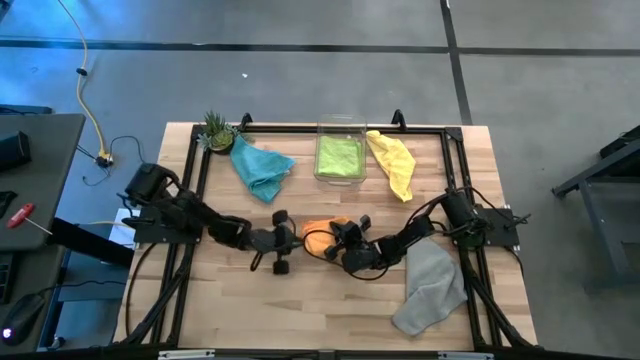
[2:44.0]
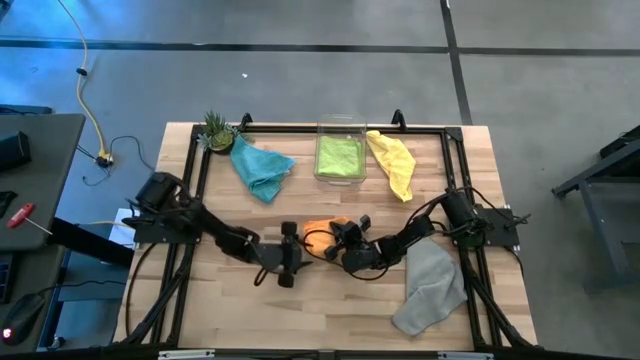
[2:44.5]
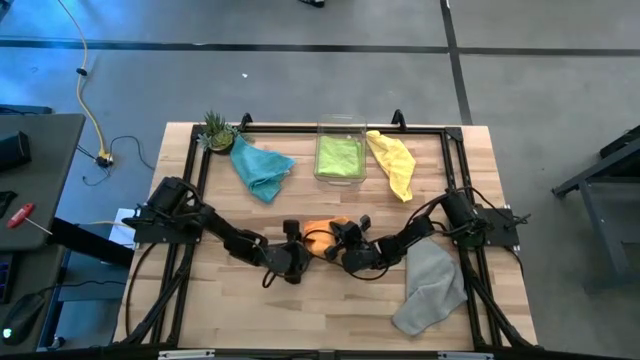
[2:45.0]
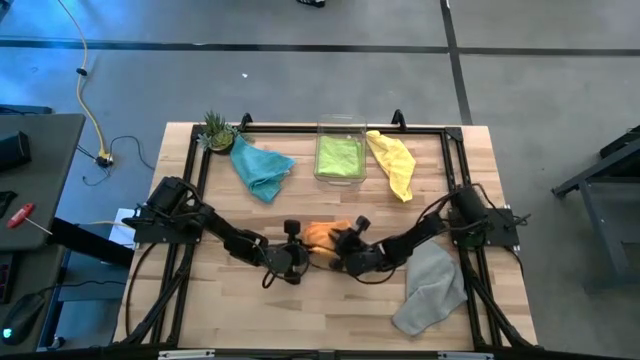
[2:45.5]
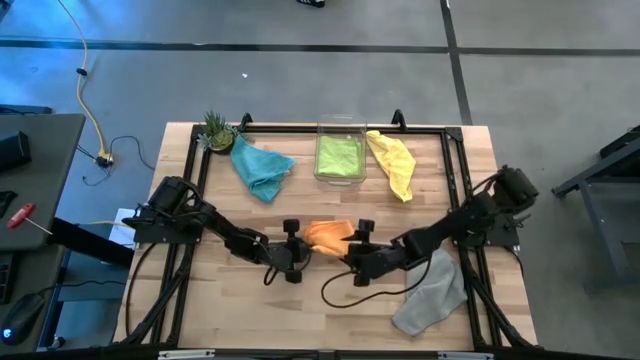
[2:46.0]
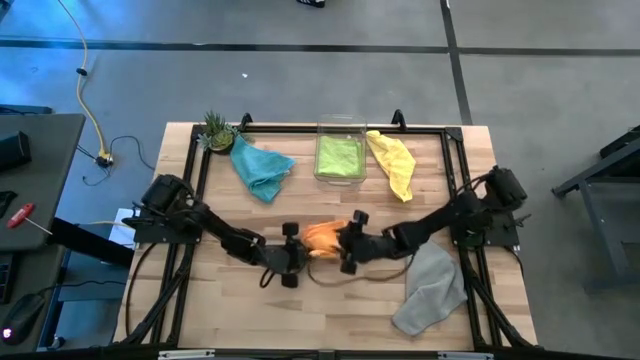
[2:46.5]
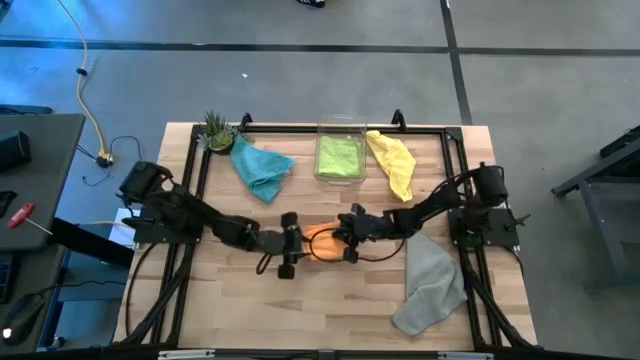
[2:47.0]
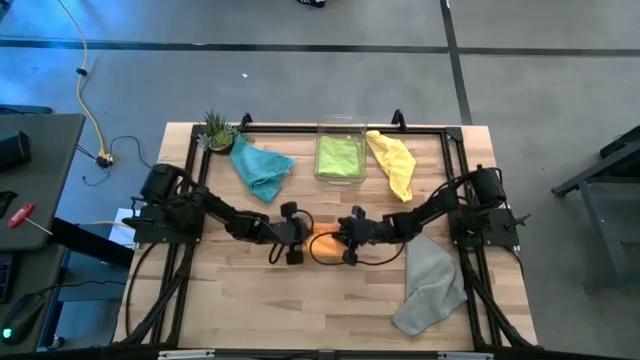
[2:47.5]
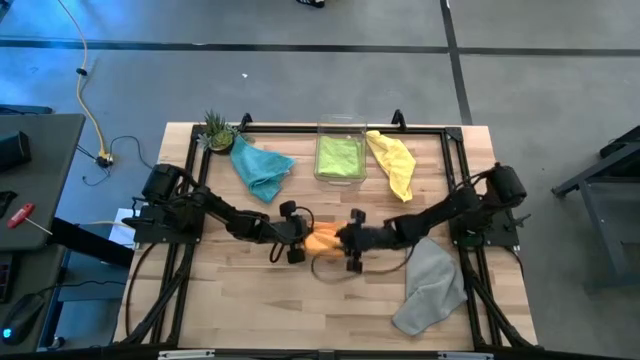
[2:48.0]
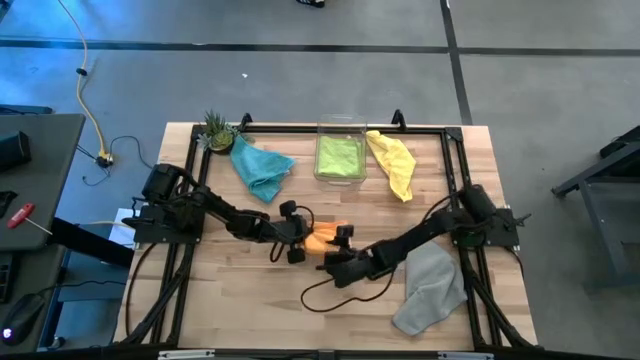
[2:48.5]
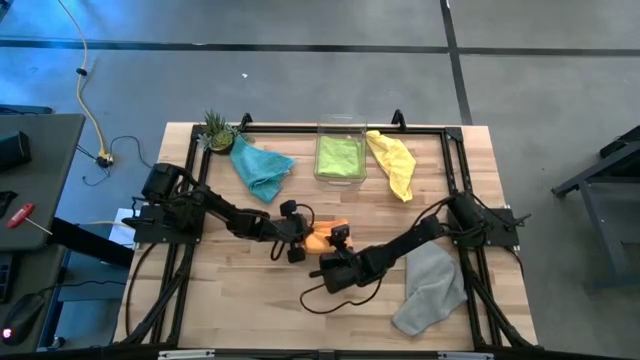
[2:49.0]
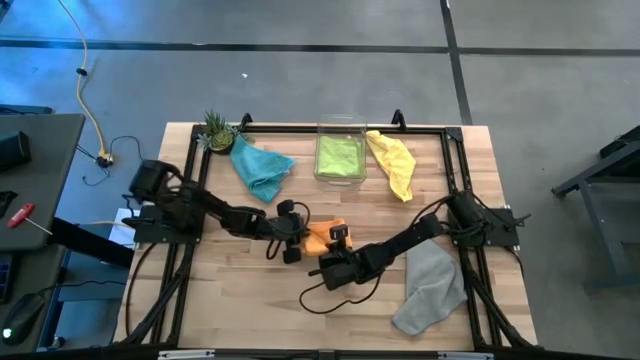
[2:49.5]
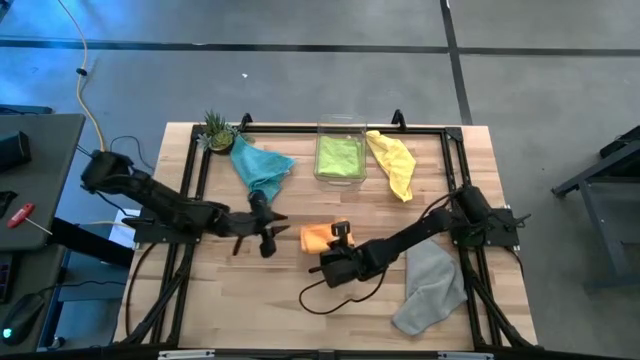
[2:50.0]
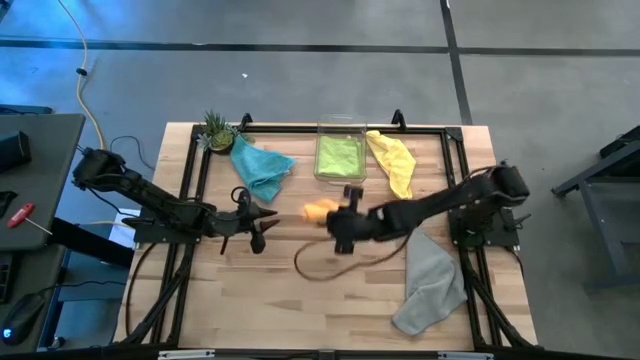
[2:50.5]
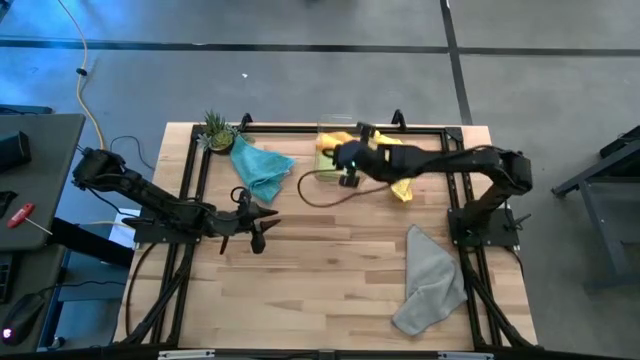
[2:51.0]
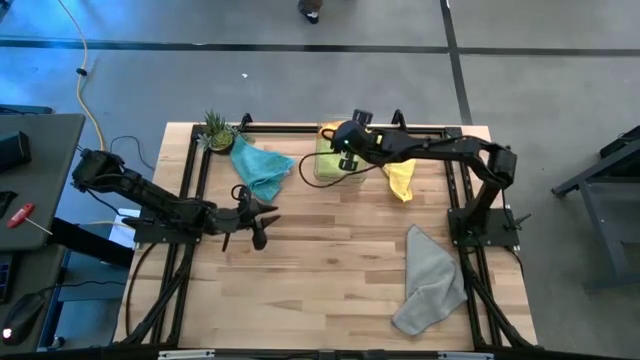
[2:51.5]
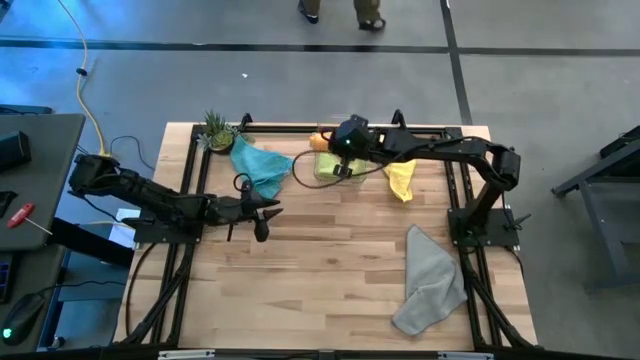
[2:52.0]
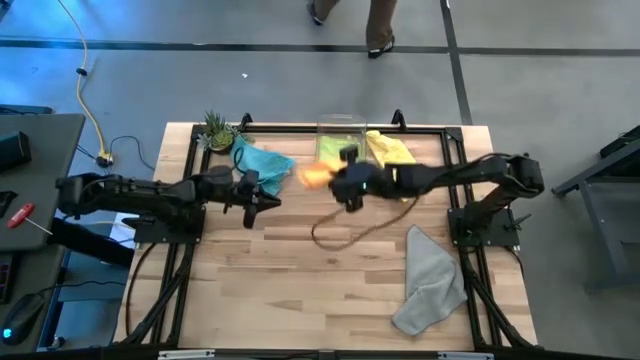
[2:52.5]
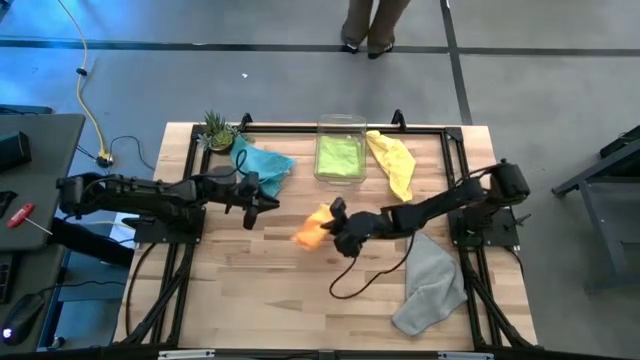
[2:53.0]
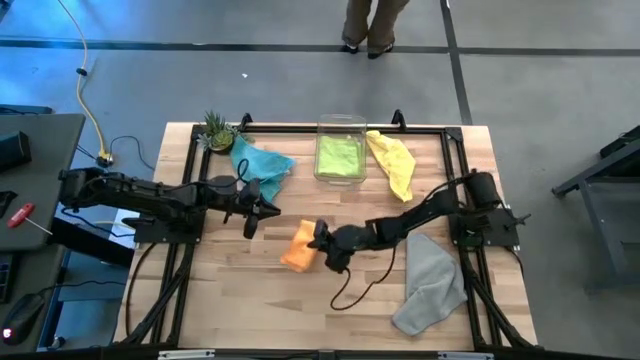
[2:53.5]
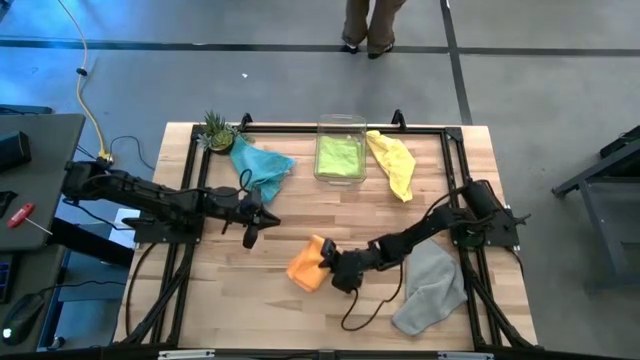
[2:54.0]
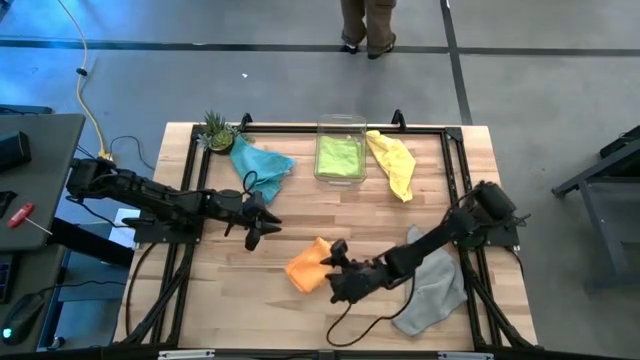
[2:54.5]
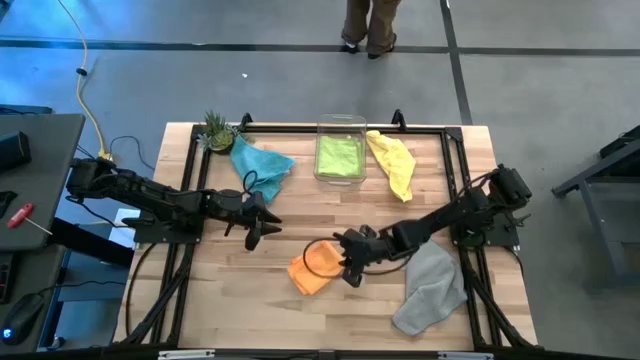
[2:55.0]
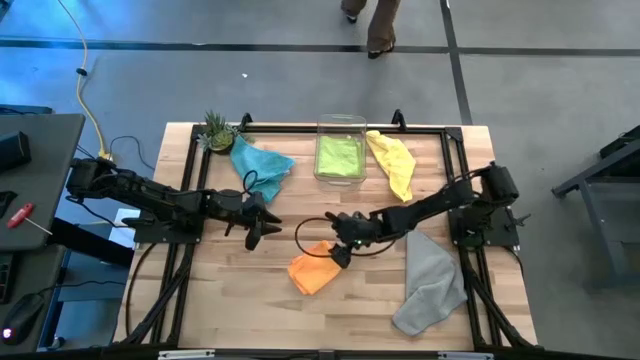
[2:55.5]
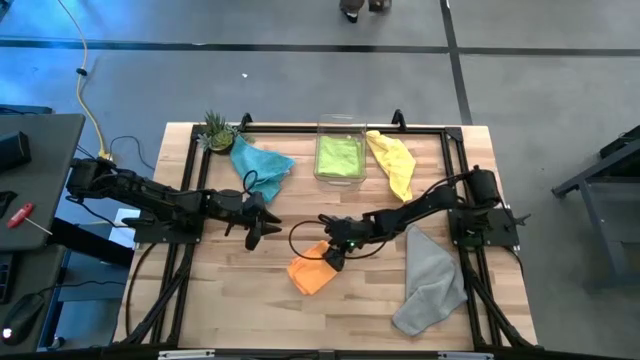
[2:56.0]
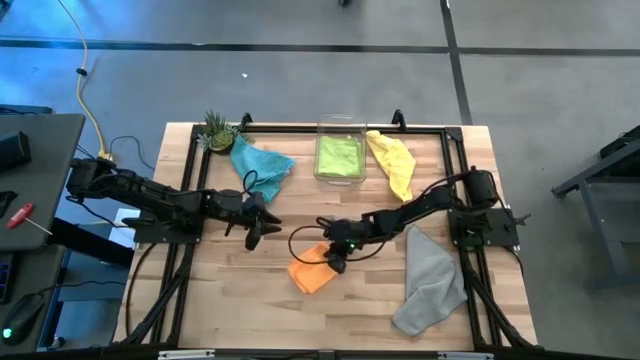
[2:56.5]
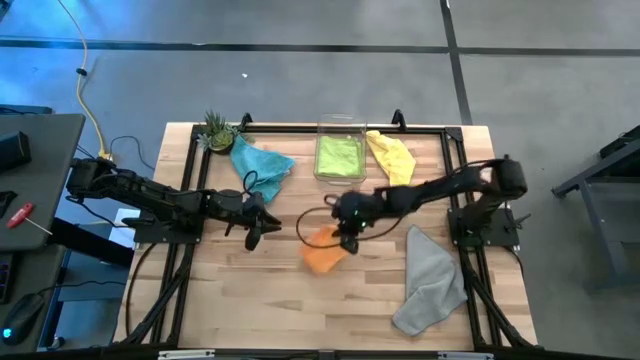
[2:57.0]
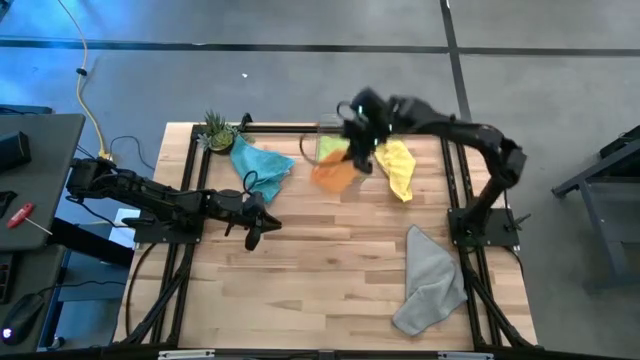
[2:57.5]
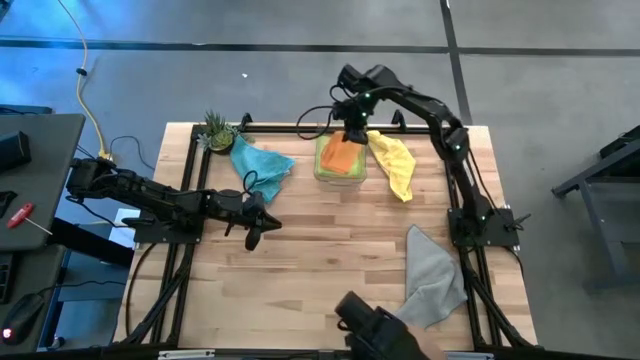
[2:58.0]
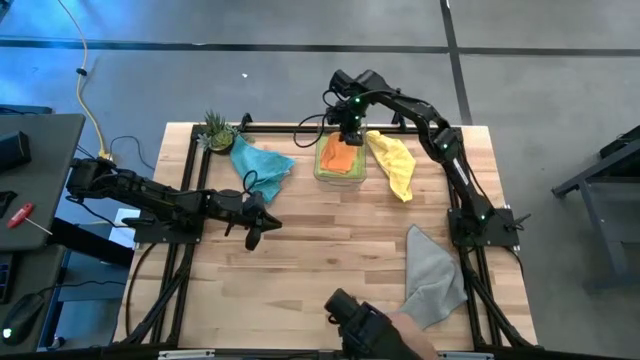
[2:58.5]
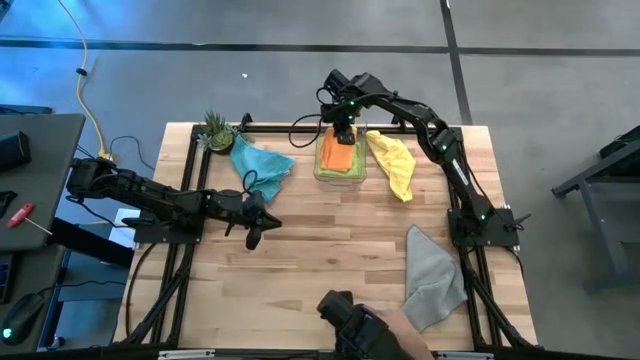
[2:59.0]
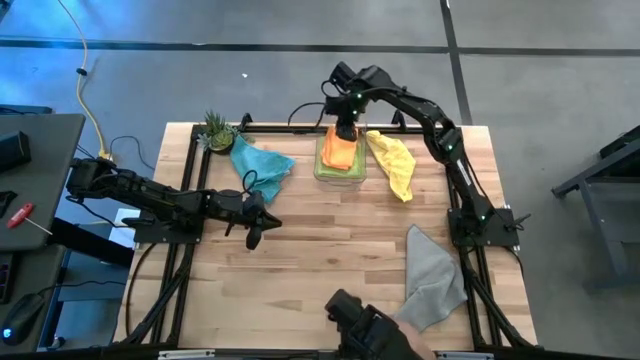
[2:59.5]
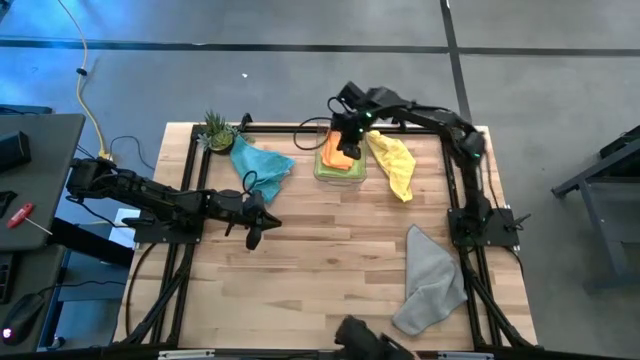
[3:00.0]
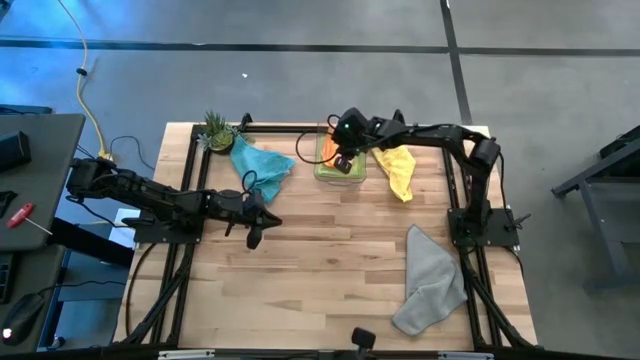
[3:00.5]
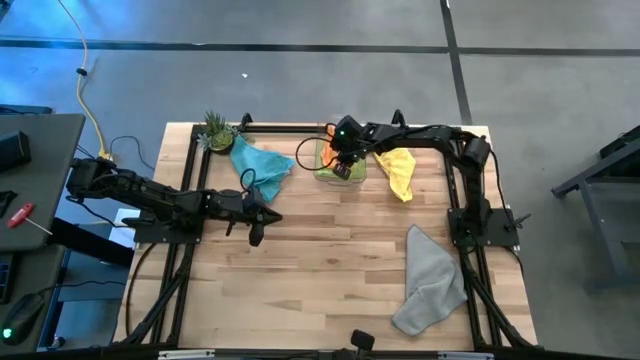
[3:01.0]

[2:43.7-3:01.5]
Task: Fold microfiber towels
Stack the orange microfiber cloth on top of the green microfiber cloth in the transparent bin

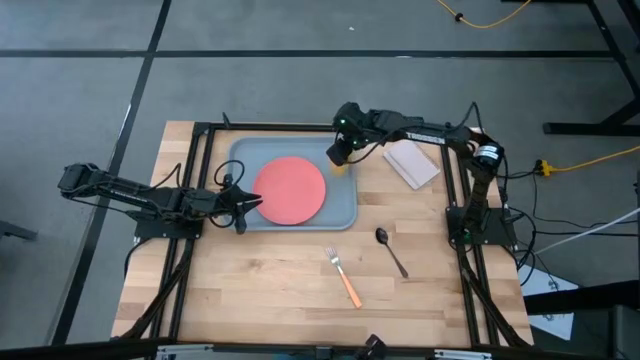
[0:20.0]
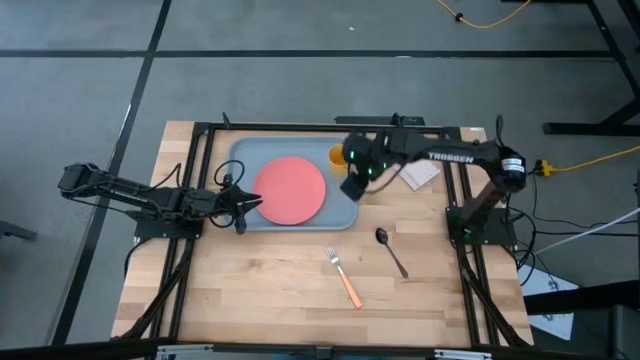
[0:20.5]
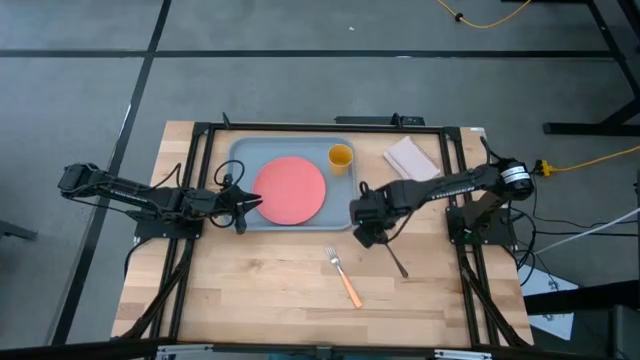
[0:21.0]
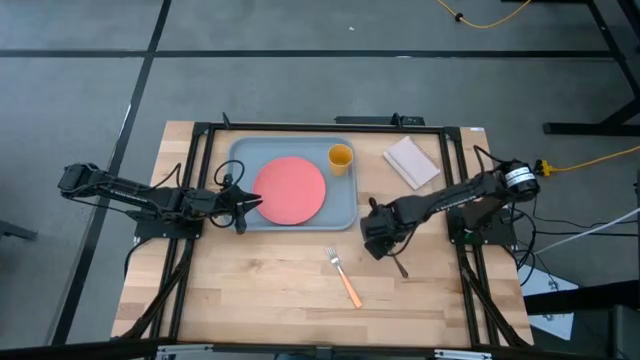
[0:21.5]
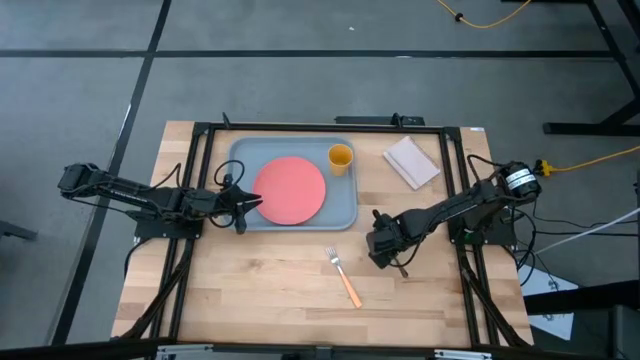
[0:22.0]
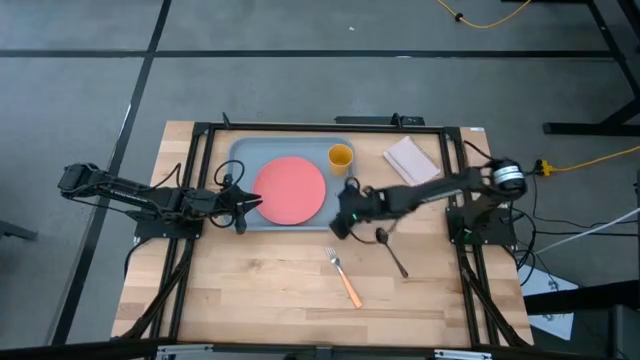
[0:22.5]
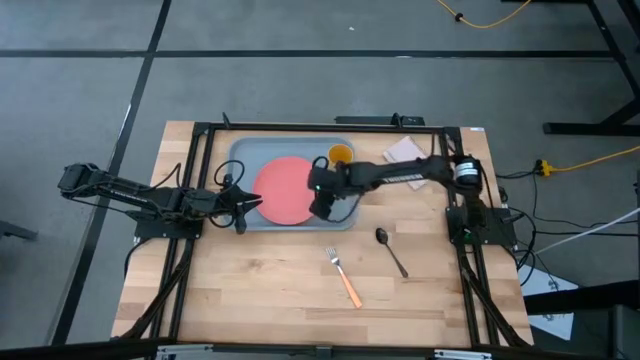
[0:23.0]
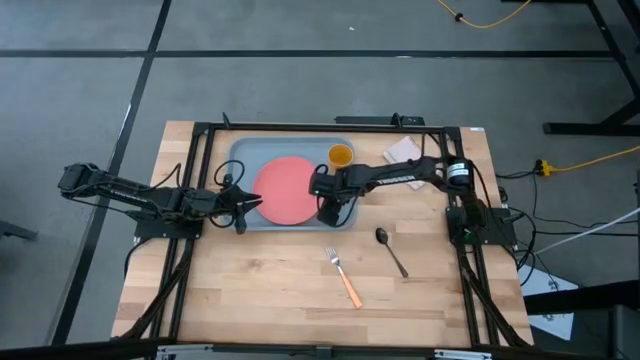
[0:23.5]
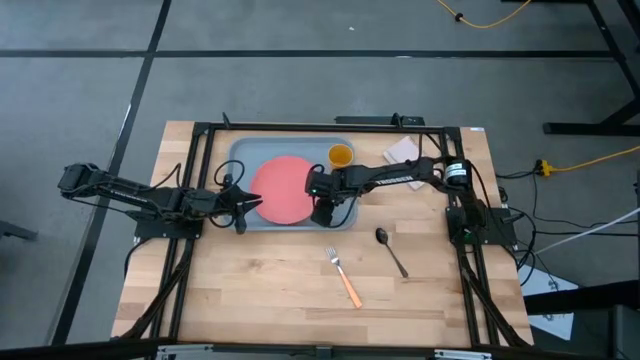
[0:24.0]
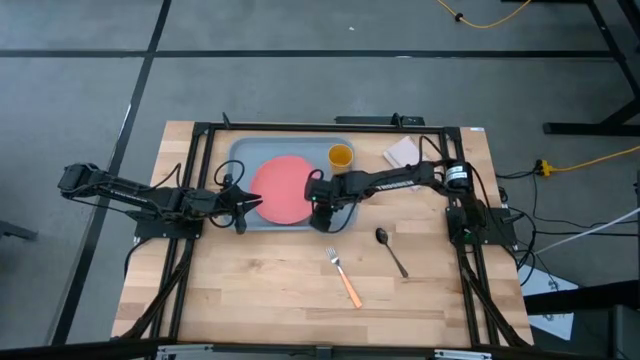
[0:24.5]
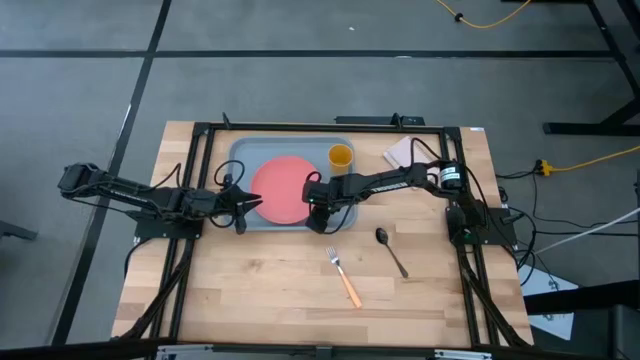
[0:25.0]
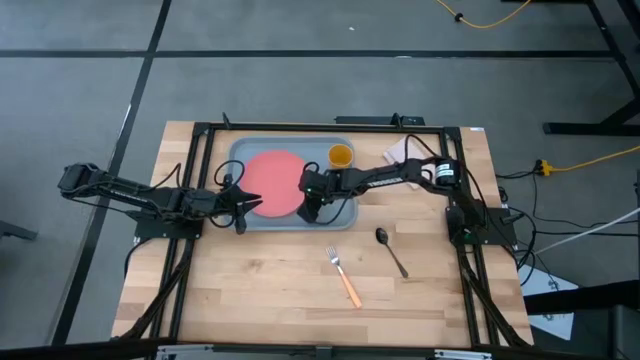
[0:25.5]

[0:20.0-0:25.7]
Task: Pick and place plate/cup/fork/spoon on tray
Adjust the pink plate on the blue serving tray
